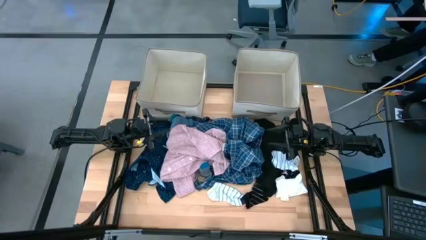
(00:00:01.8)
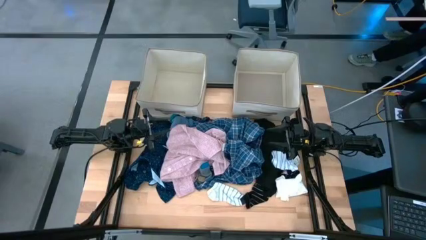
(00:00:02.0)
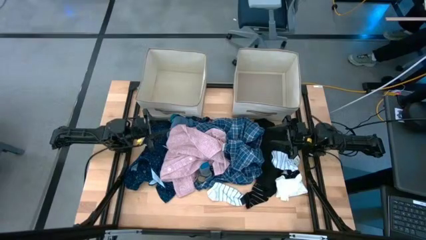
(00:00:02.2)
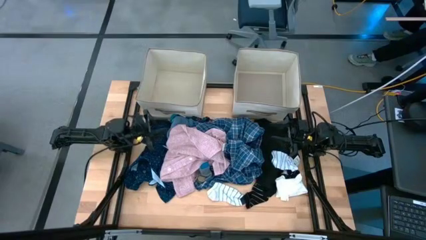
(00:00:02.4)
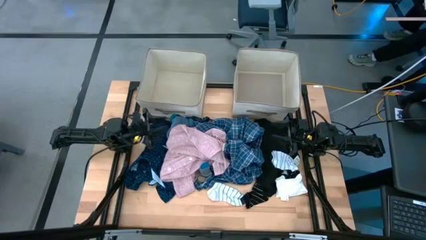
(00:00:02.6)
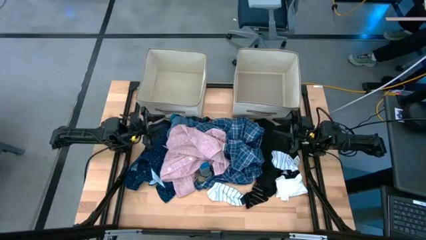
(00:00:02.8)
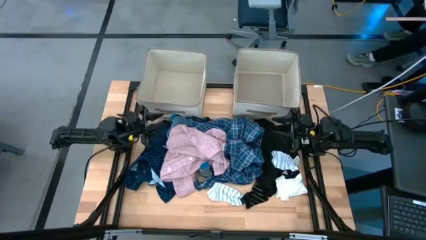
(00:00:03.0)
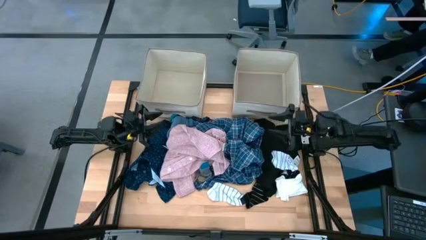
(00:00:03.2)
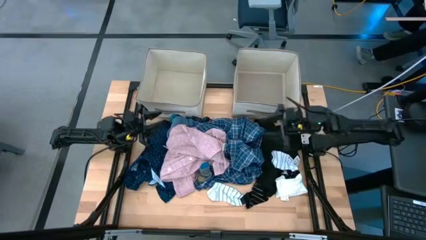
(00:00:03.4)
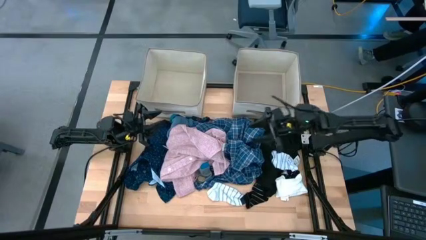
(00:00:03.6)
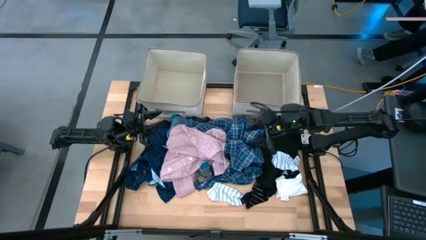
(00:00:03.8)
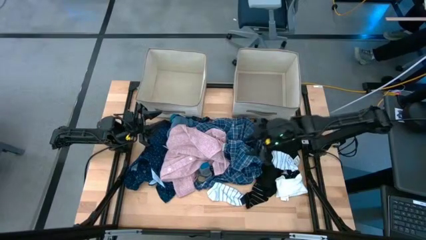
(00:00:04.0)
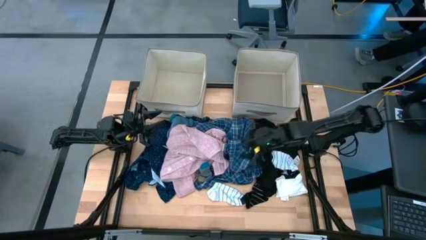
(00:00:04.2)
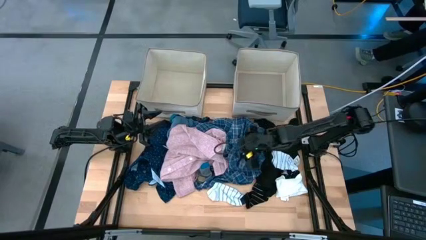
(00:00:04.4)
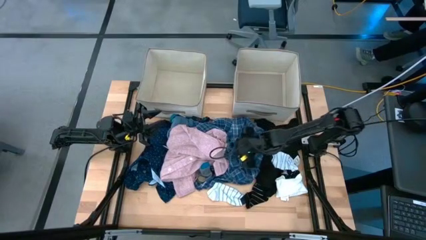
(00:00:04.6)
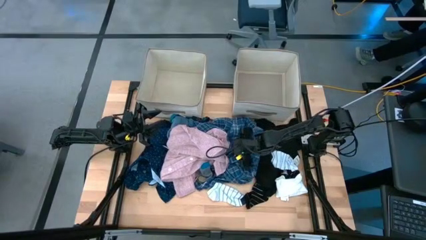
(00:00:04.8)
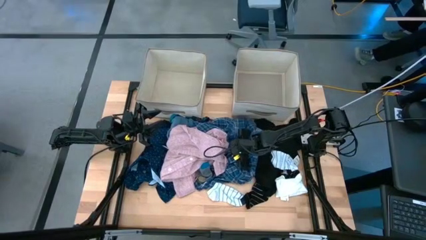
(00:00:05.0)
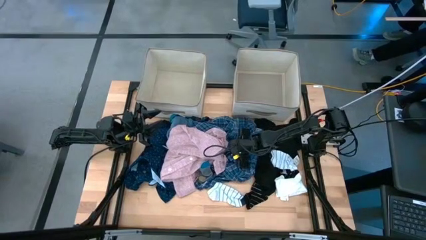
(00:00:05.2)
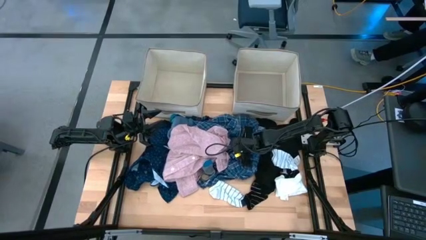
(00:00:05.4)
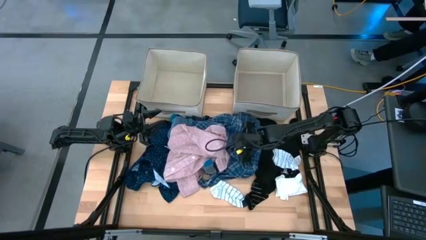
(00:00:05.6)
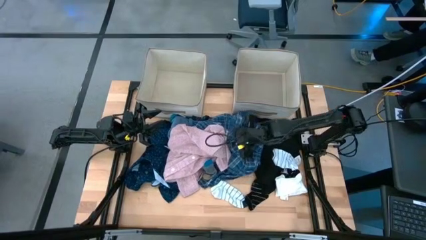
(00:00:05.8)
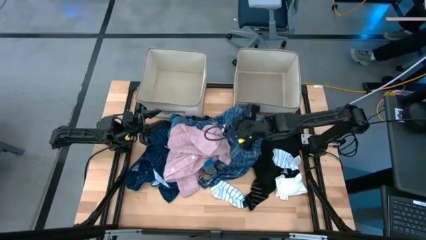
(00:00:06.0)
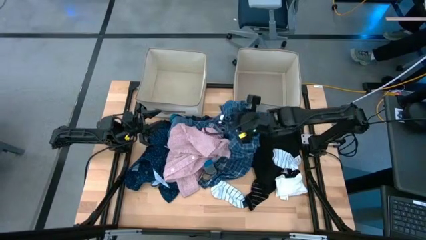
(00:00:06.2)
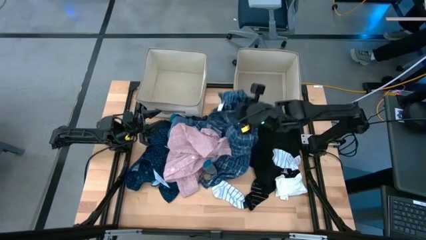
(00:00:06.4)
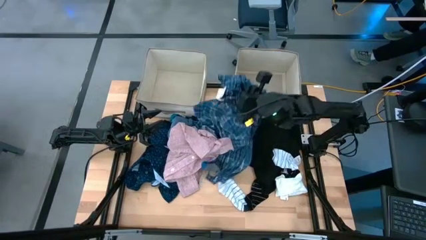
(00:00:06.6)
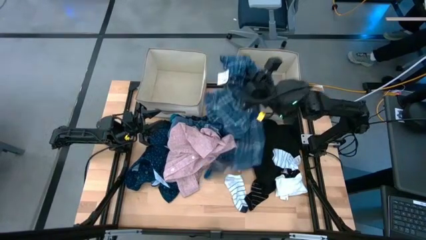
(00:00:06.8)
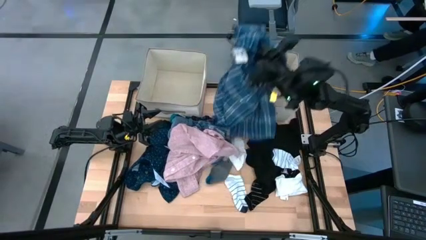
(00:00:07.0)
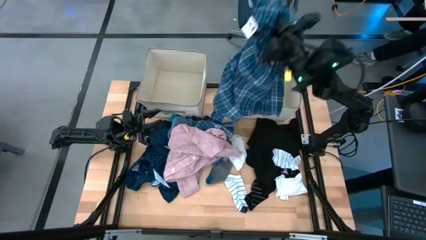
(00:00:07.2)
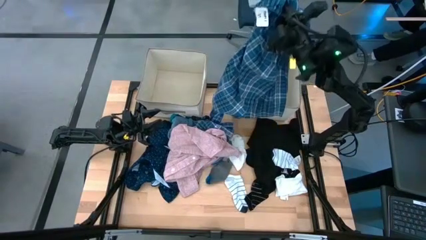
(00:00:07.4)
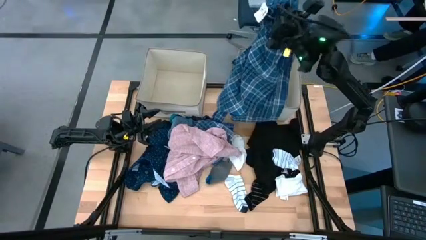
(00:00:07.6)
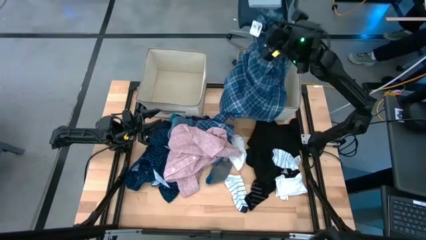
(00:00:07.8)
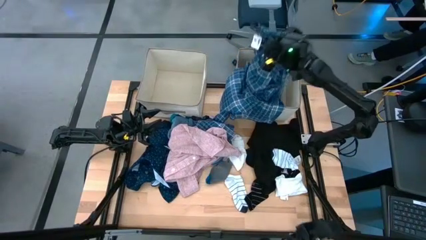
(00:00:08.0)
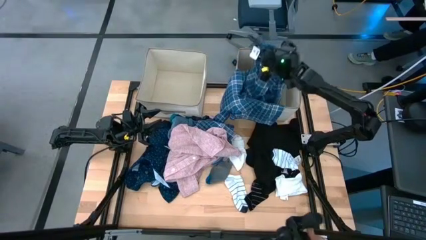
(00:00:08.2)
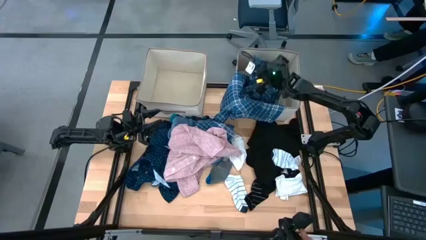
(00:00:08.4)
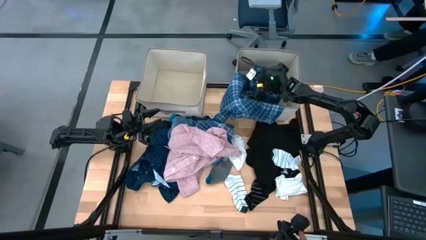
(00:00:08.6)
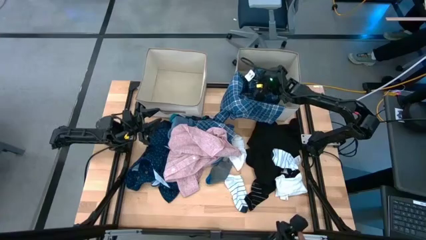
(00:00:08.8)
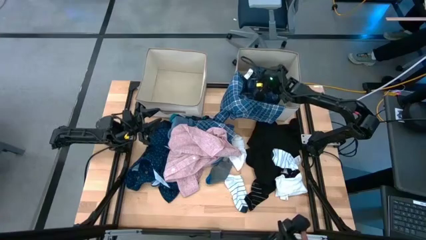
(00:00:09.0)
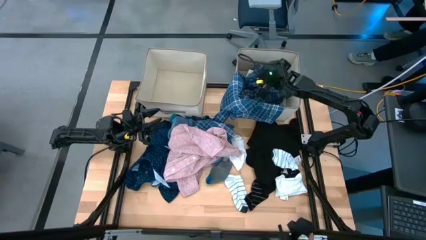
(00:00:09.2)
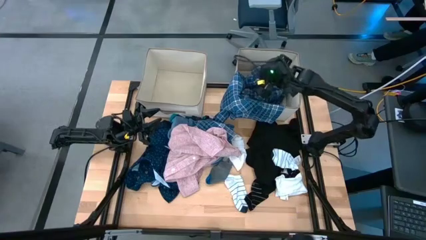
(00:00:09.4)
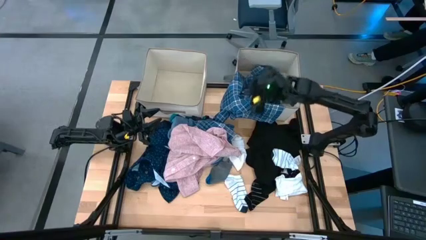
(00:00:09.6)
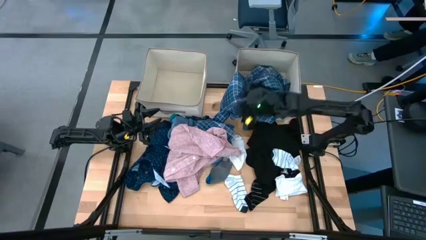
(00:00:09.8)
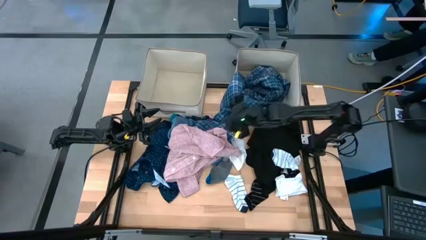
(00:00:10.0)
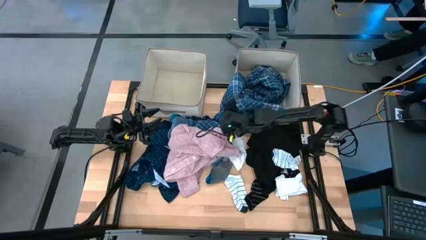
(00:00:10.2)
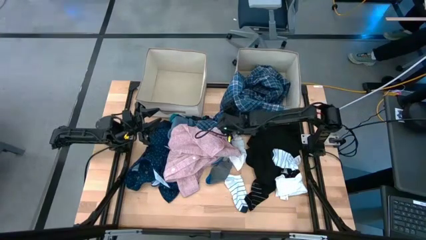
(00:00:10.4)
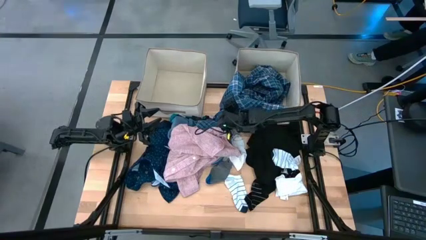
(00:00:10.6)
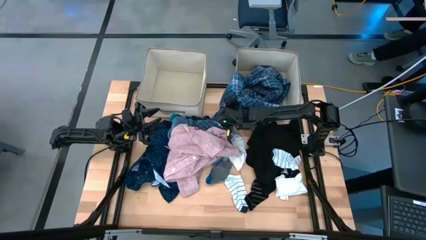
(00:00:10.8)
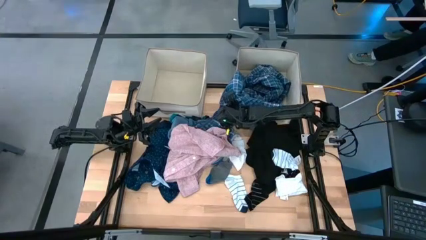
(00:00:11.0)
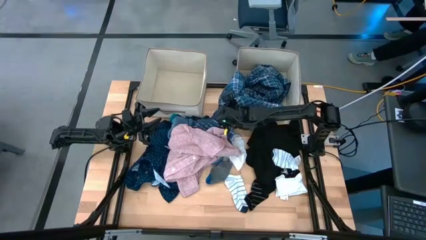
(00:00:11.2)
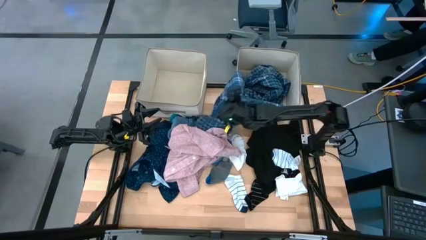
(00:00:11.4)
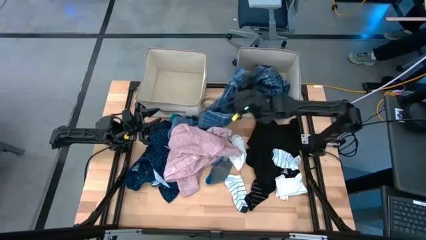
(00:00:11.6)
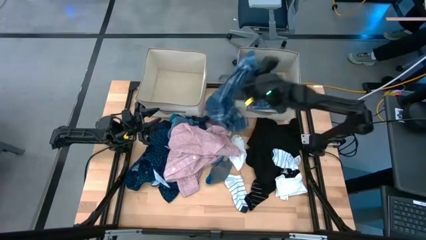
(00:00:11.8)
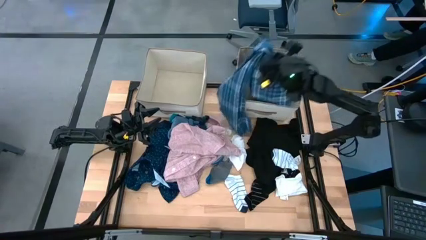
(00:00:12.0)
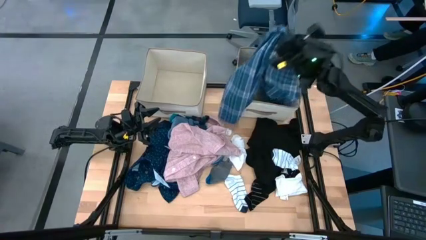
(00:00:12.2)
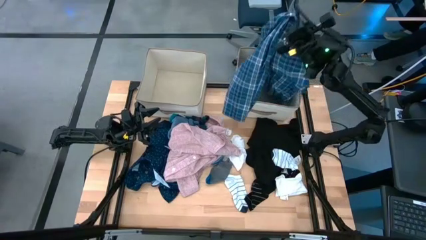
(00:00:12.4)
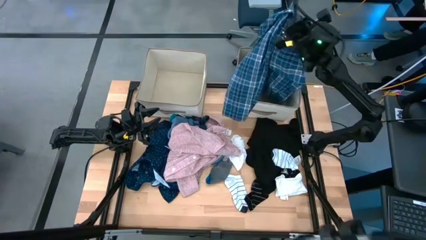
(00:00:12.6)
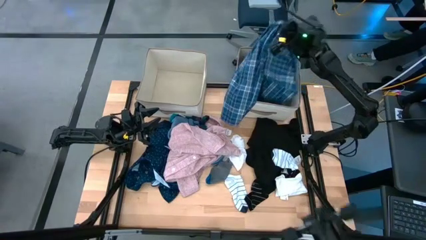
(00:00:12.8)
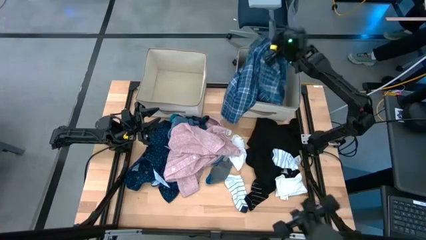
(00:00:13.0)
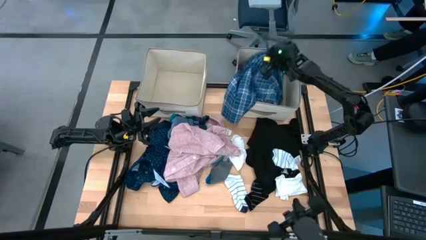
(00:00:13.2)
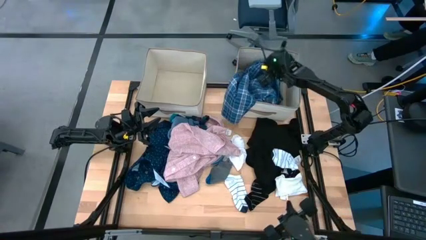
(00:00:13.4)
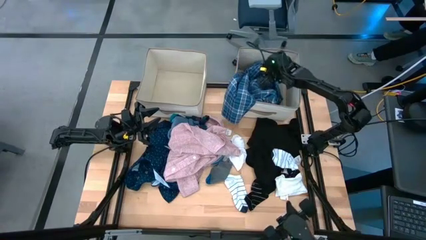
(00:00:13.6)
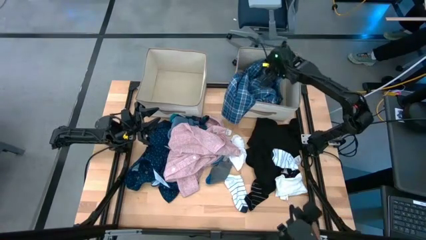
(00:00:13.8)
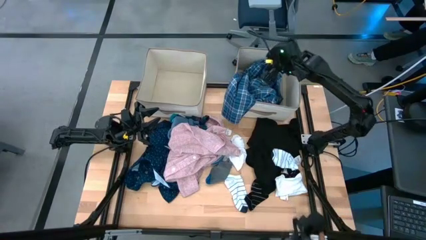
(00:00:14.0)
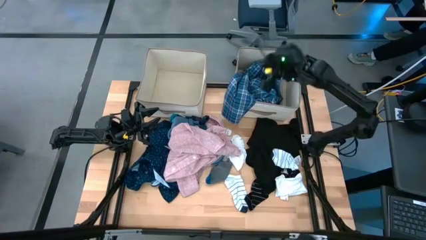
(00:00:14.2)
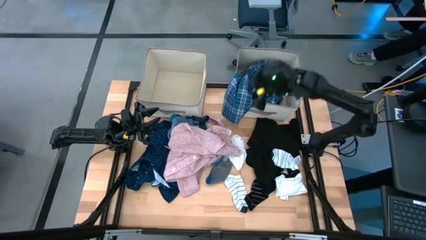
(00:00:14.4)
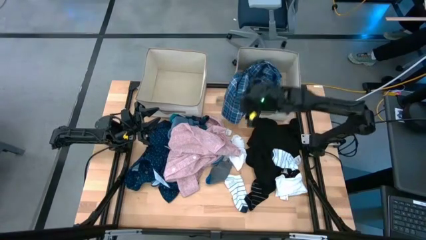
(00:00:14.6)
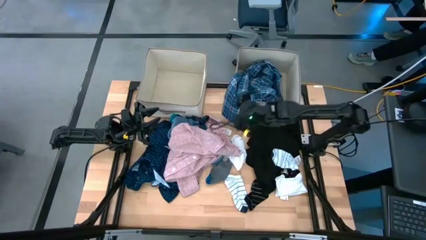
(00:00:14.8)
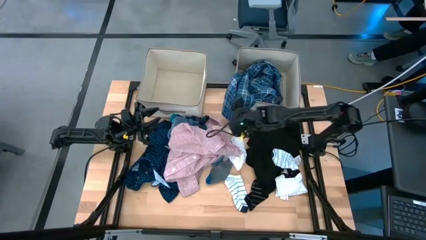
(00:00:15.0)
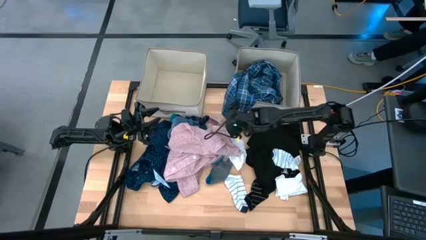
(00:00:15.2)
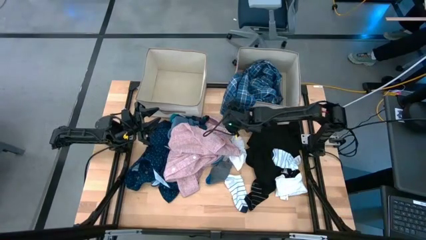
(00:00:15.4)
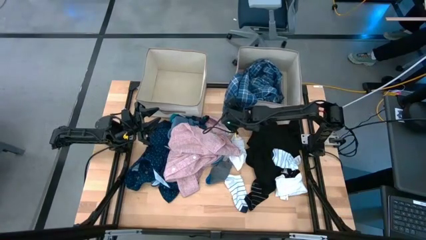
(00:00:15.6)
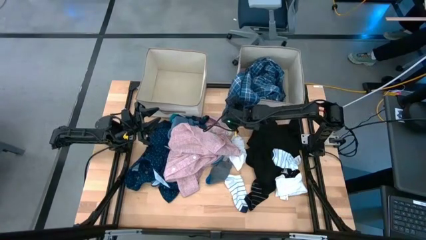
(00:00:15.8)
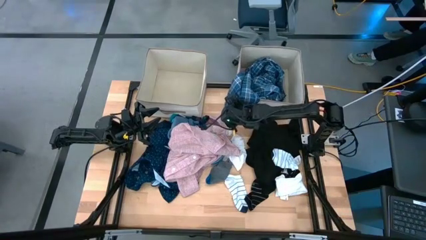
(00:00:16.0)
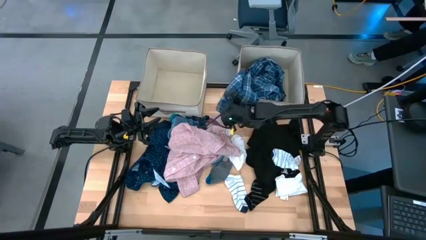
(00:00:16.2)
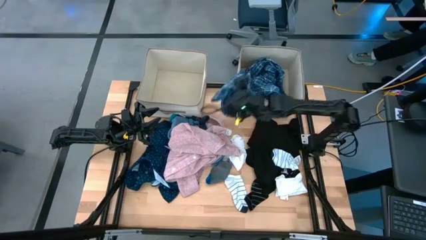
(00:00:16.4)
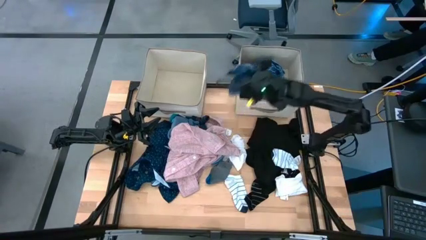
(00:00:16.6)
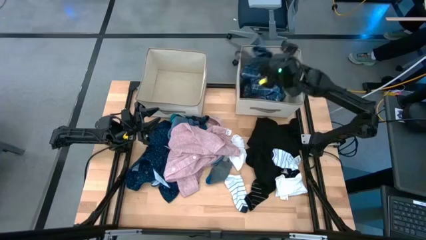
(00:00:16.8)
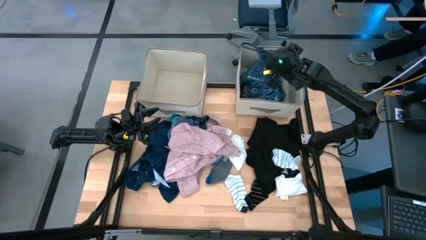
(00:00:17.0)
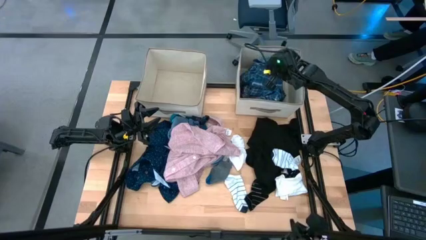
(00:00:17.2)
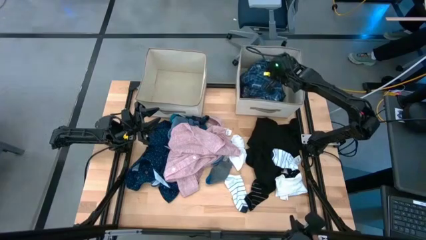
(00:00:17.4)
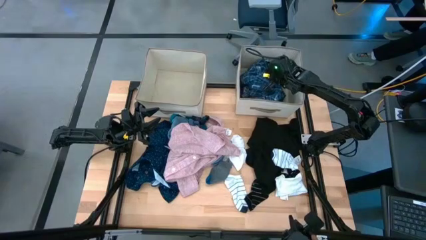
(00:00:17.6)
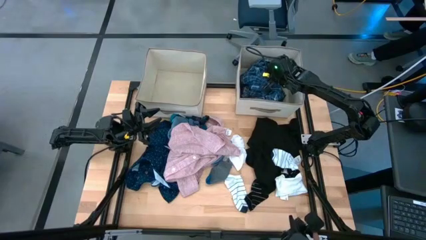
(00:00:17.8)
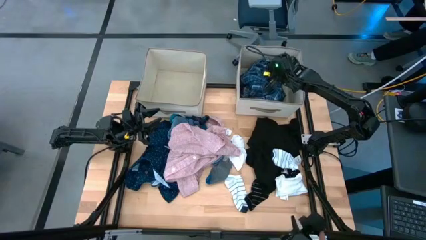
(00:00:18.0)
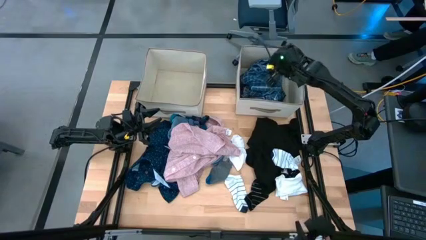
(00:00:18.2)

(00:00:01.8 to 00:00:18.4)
Task: Sort clothes
Put the blue pants into the right laundry organizer
